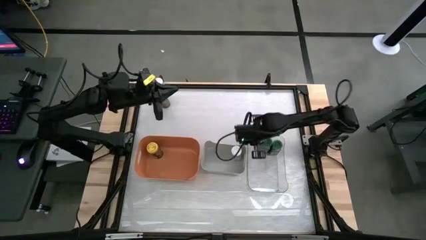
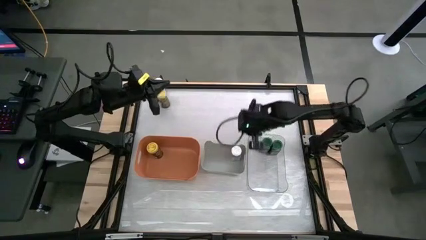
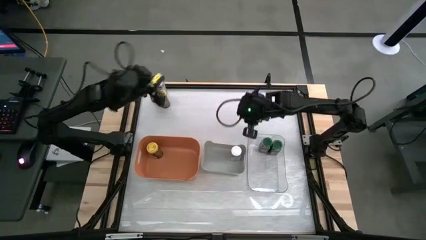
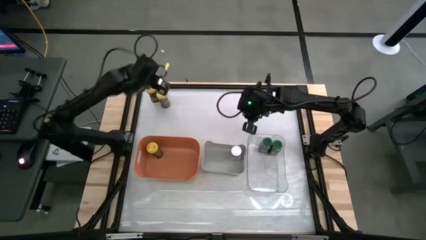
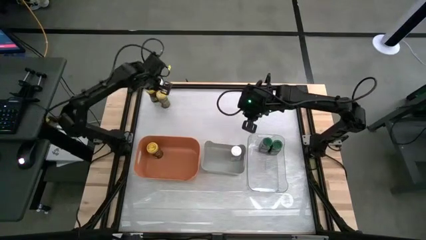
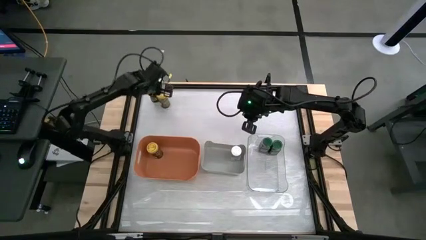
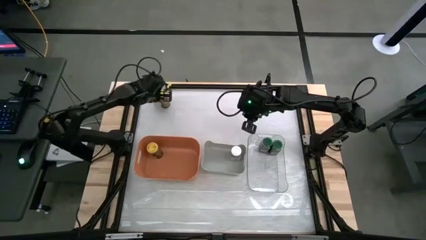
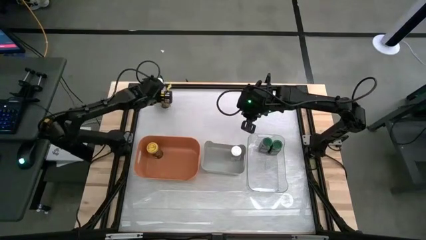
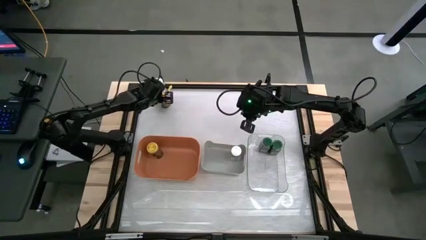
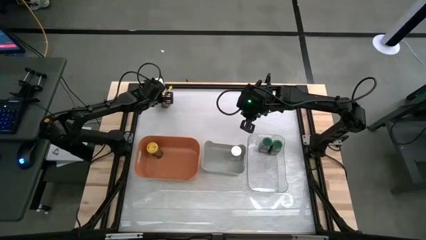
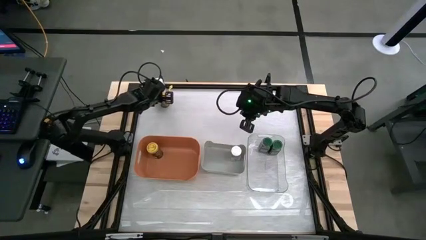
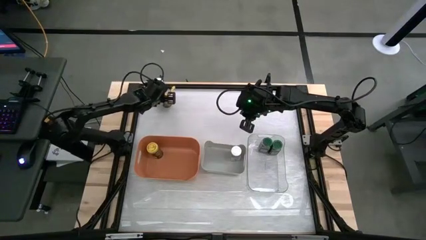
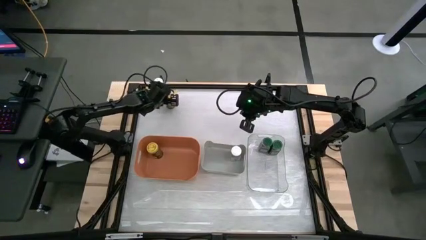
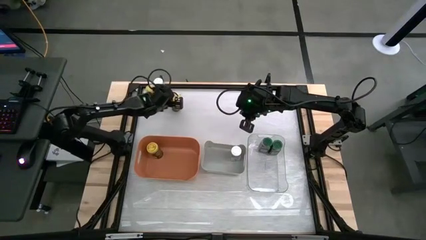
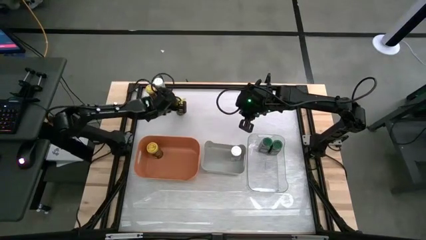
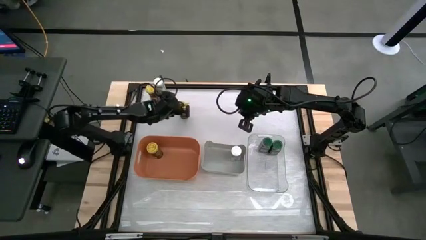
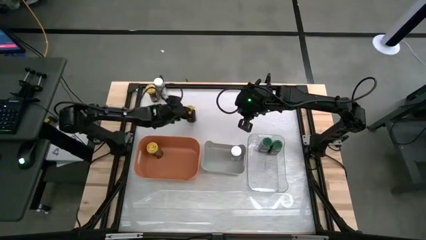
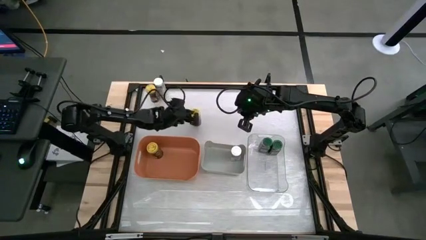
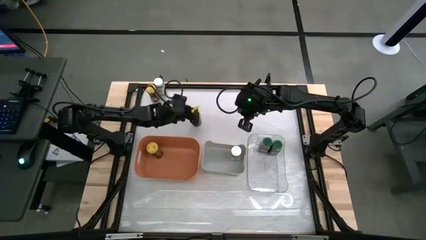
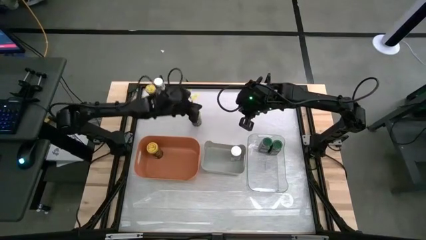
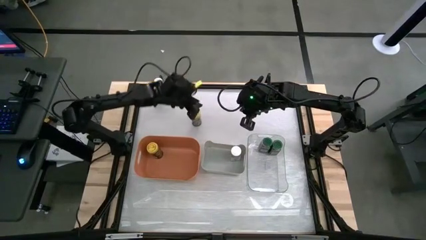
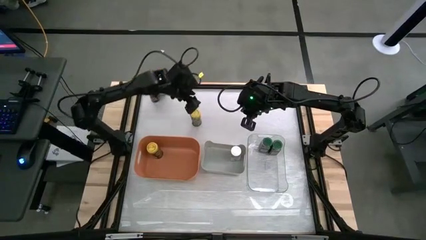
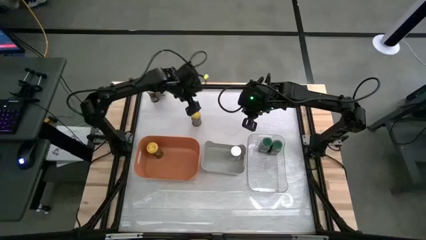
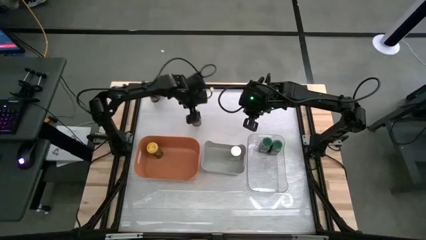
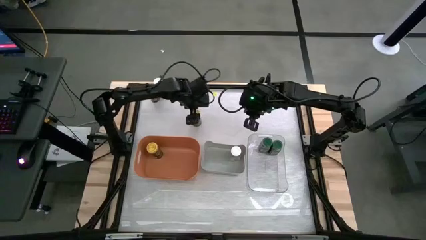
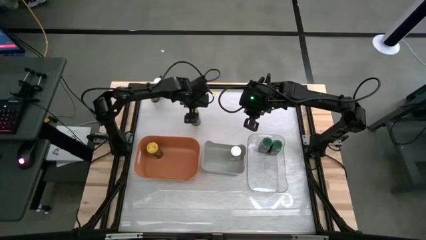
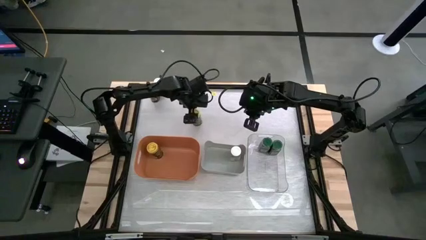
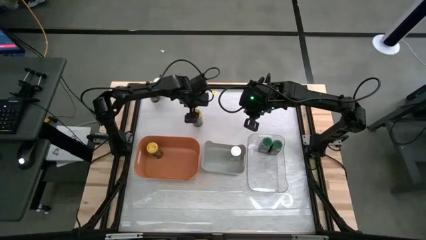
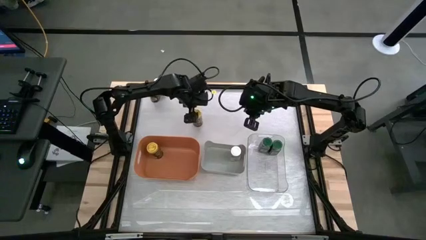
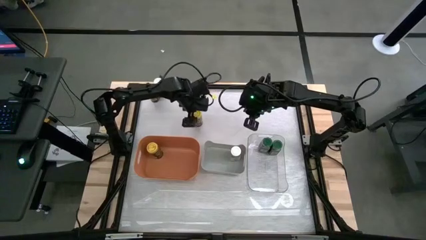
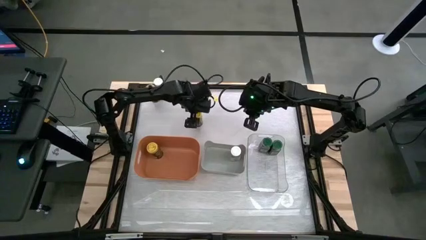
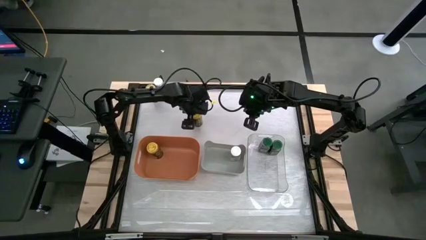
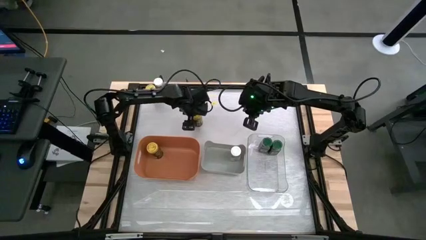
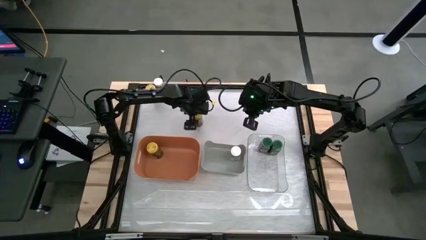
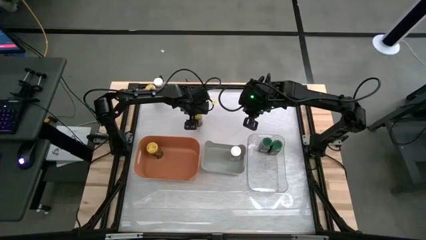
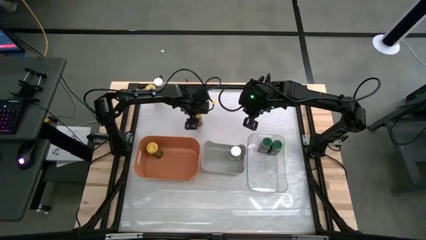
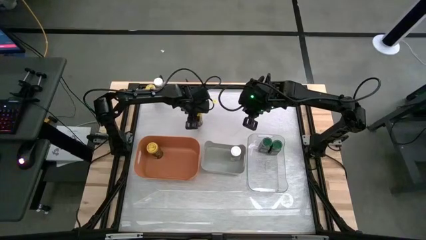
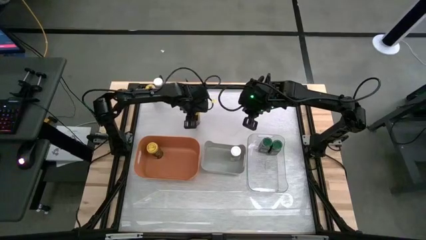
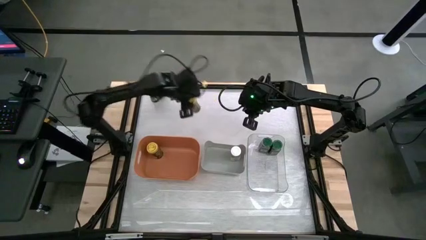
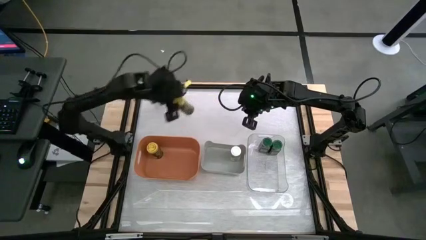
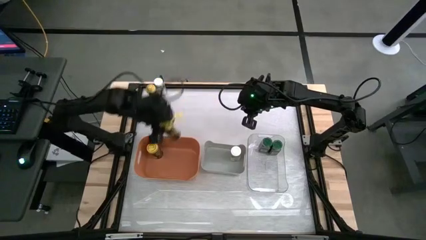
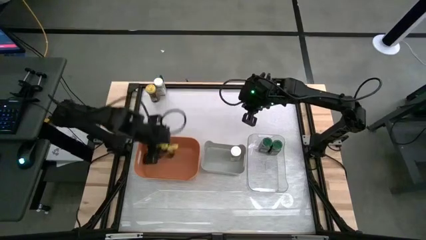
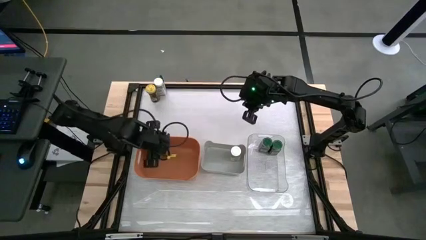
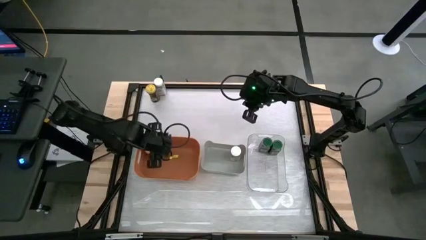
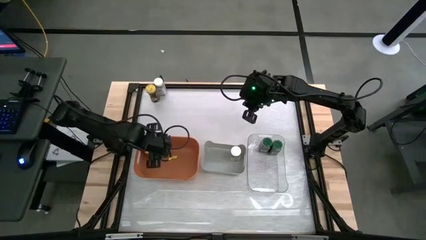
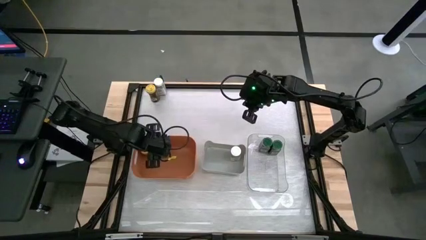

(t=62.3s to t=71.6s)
Task: Sort spices by type
Put the right yellow seasoning can into the orange bin

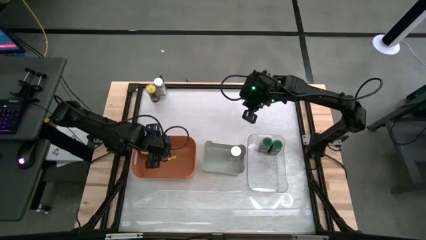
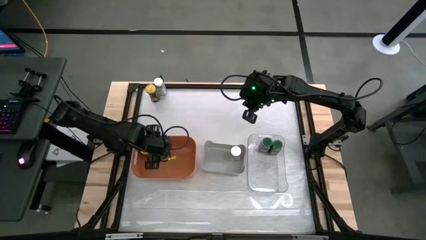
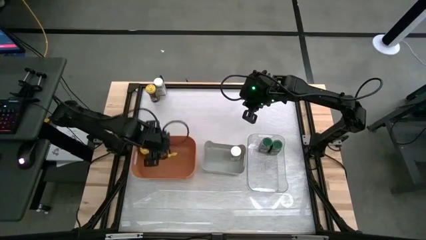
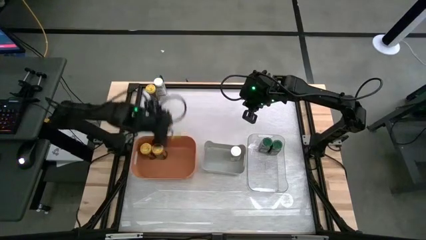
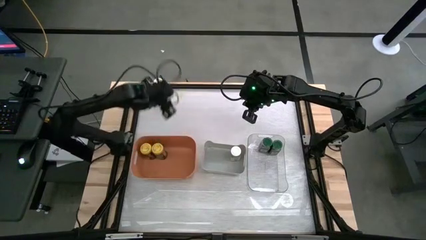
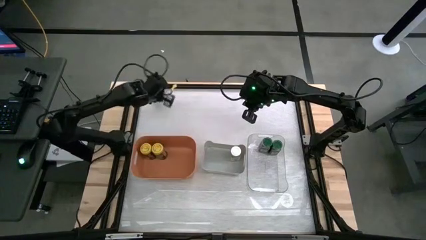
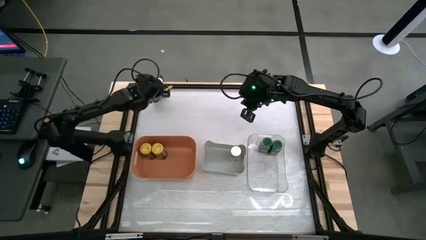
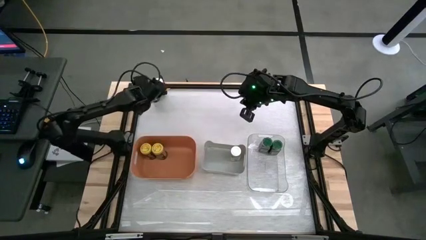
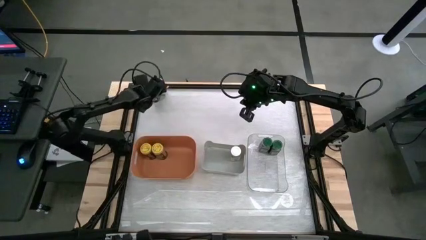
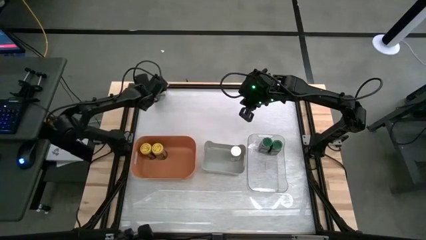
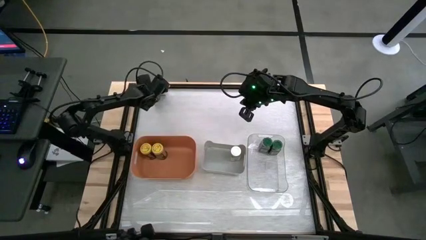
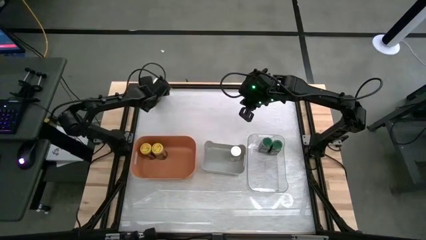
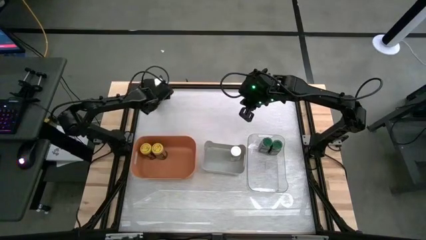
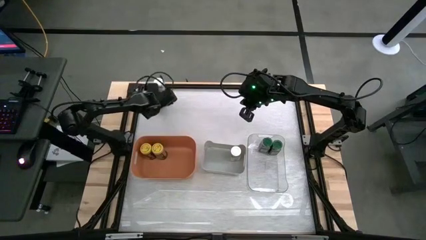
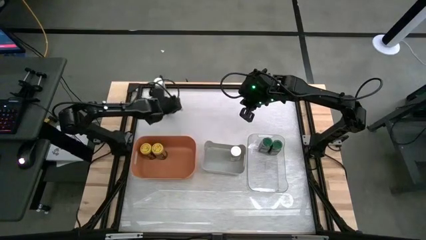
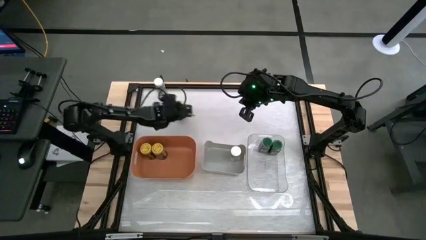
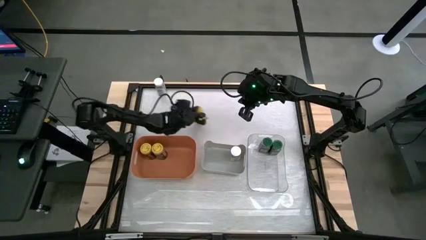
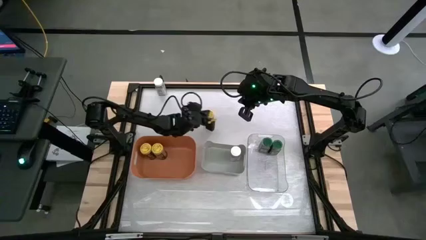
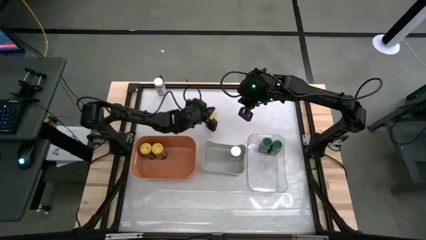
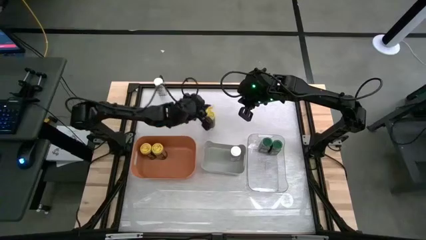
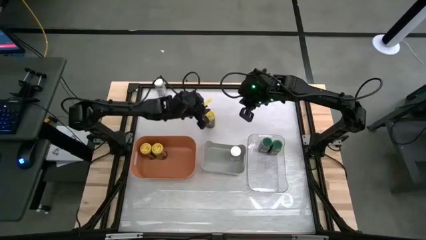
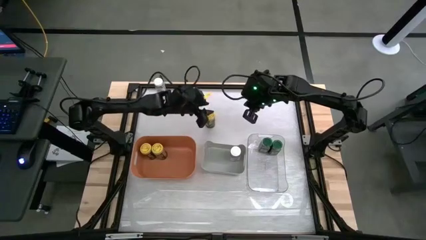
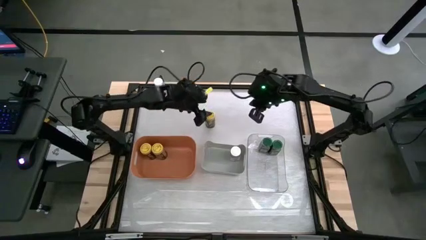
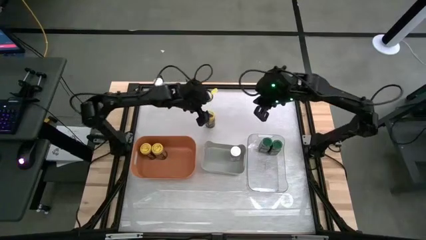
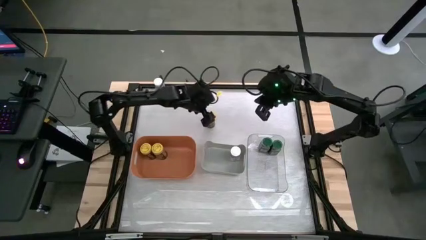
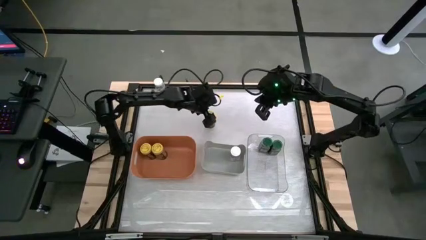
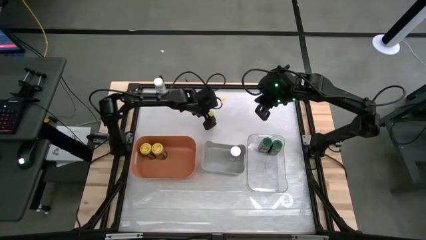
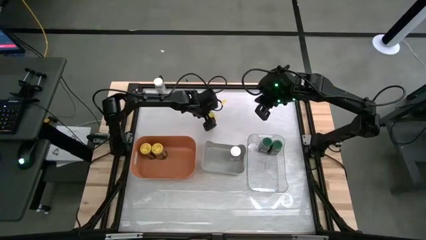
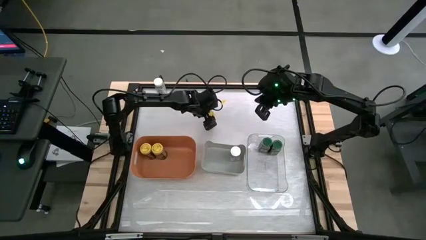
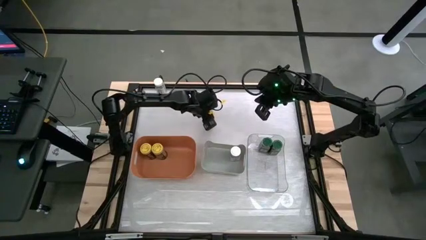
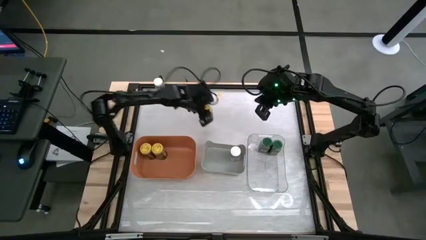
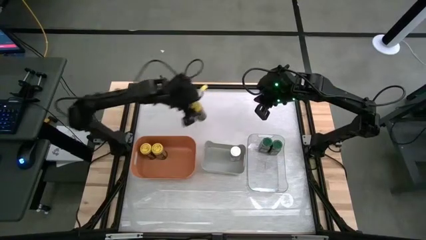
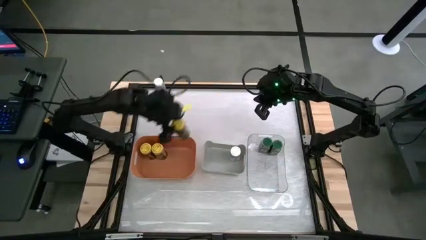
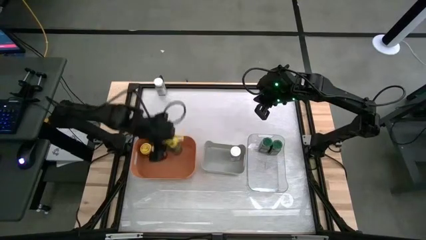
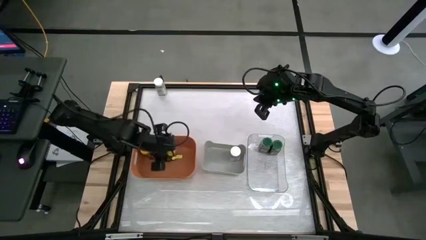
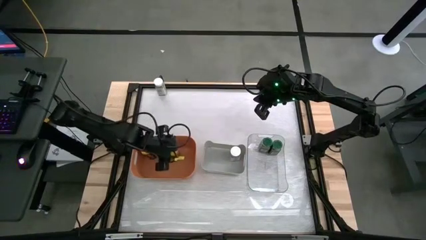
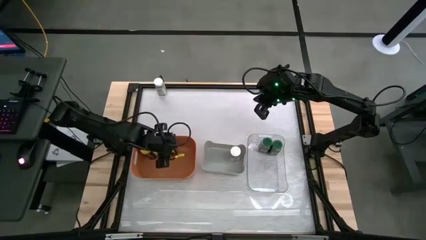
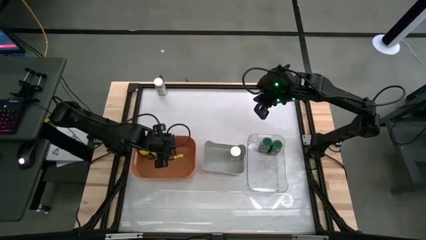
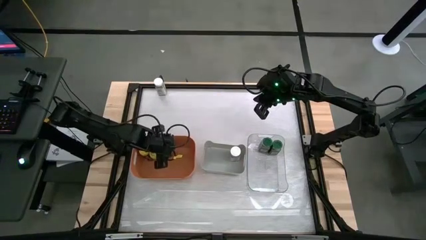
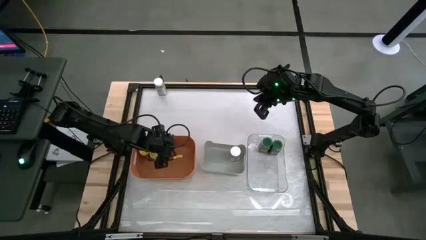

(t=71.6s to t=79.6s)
Put the yellow seasoning can into the orange bin
